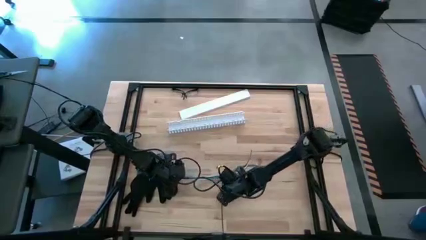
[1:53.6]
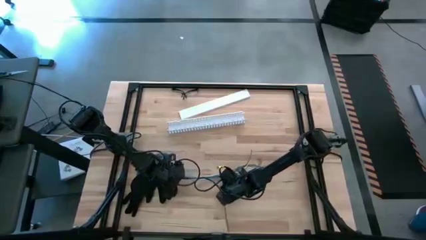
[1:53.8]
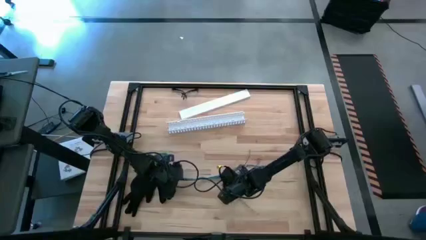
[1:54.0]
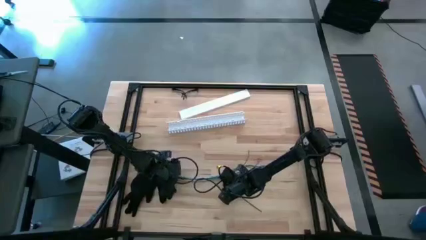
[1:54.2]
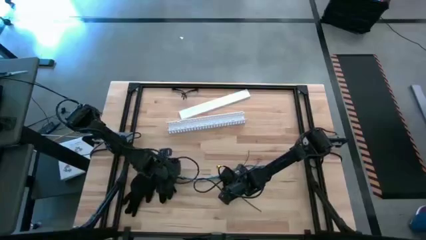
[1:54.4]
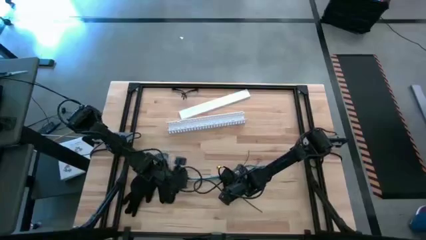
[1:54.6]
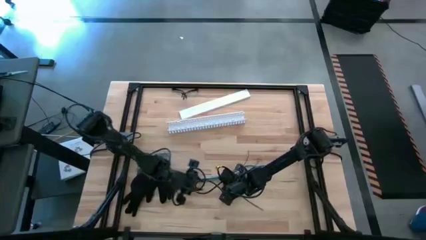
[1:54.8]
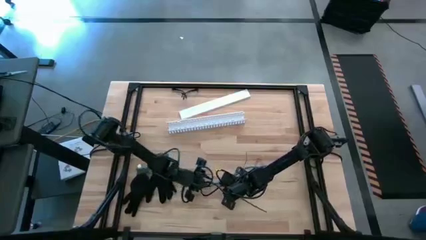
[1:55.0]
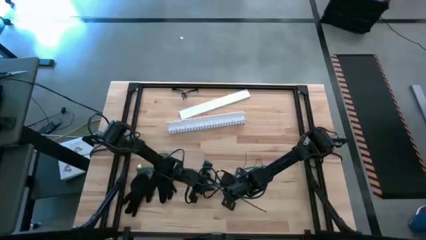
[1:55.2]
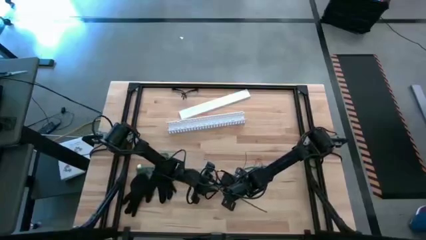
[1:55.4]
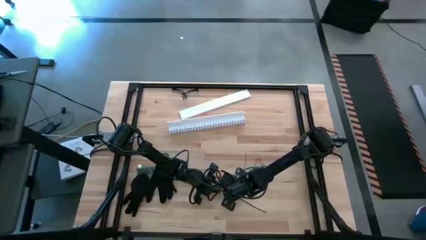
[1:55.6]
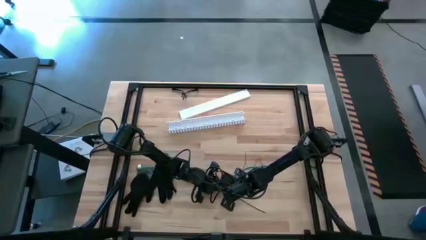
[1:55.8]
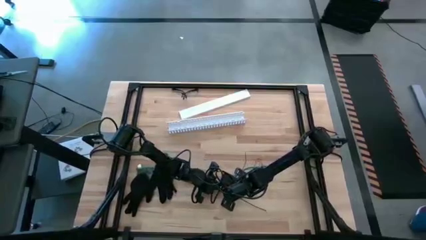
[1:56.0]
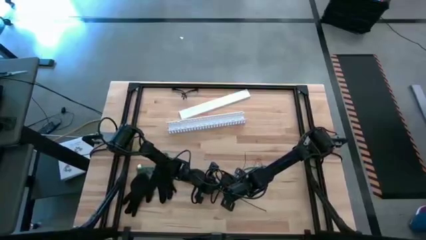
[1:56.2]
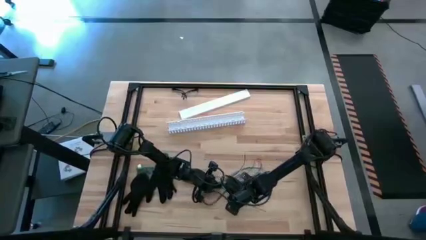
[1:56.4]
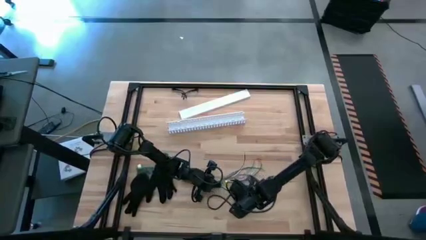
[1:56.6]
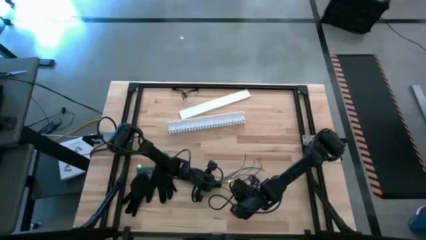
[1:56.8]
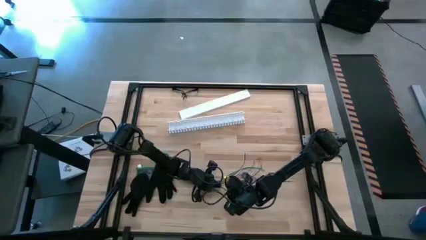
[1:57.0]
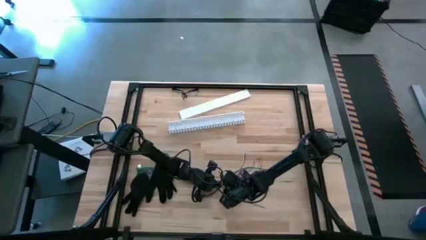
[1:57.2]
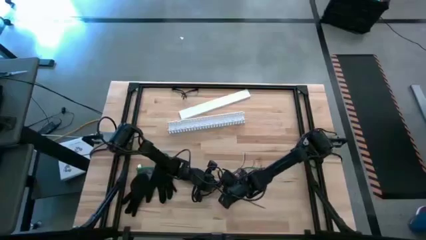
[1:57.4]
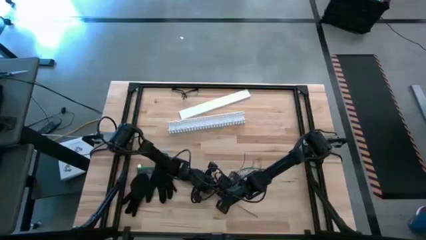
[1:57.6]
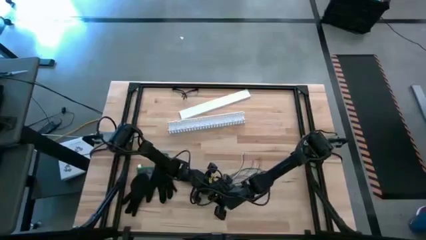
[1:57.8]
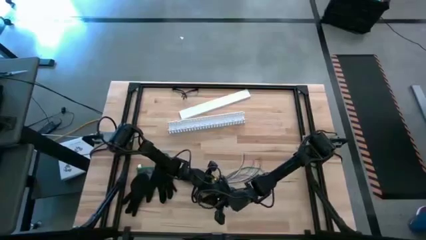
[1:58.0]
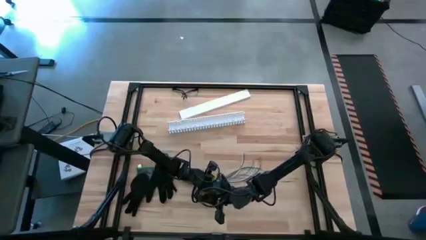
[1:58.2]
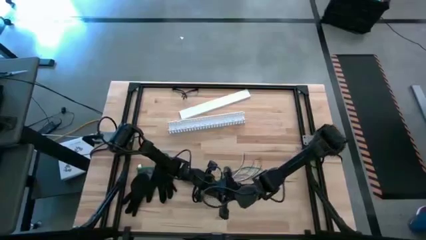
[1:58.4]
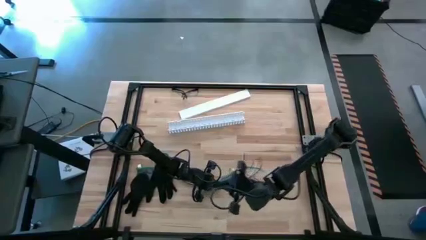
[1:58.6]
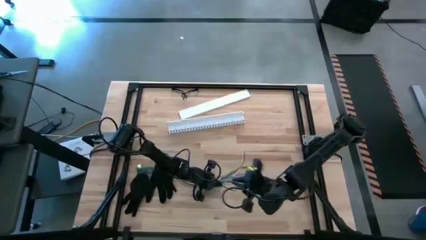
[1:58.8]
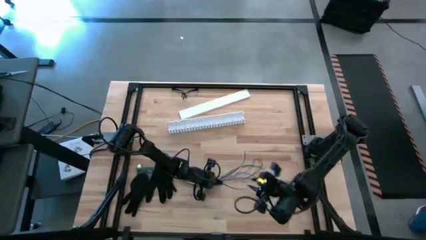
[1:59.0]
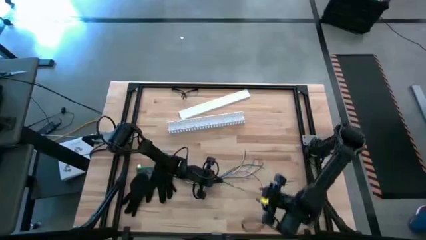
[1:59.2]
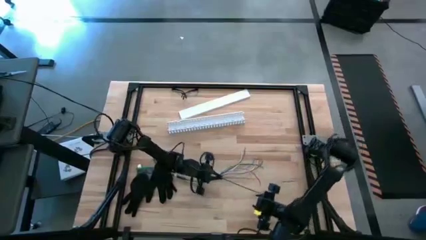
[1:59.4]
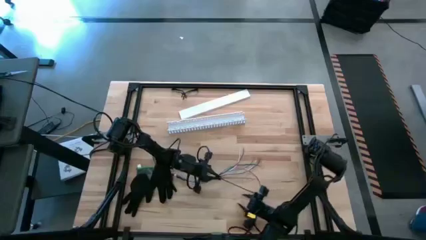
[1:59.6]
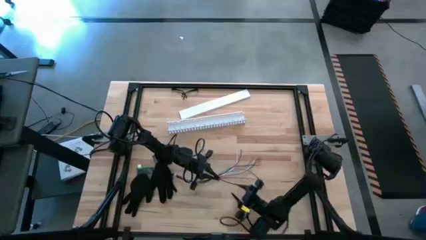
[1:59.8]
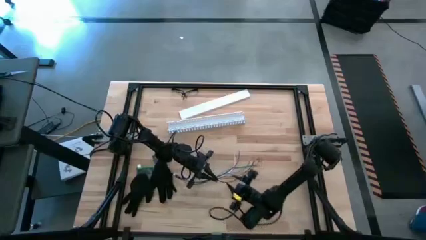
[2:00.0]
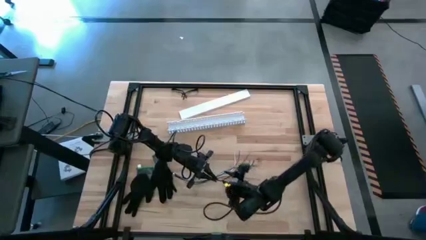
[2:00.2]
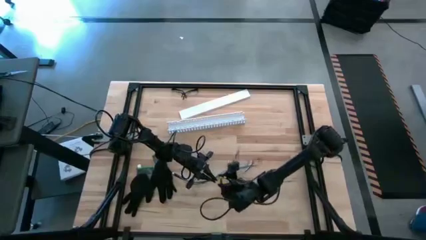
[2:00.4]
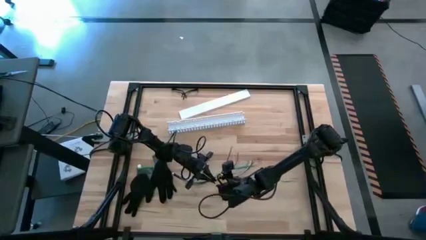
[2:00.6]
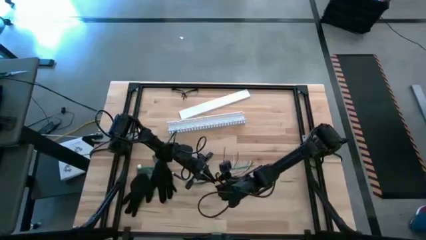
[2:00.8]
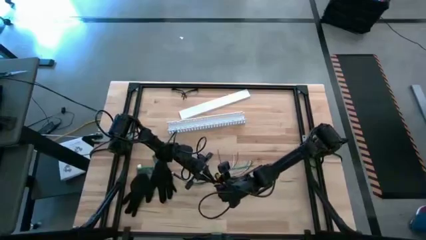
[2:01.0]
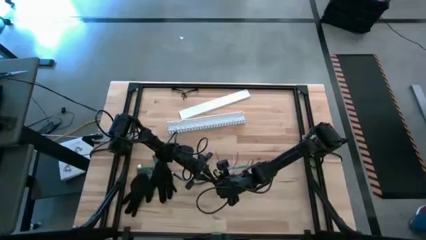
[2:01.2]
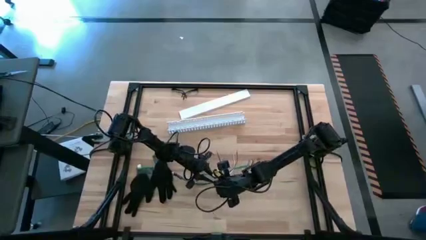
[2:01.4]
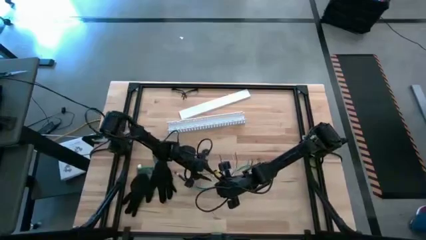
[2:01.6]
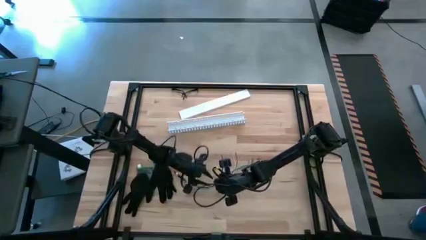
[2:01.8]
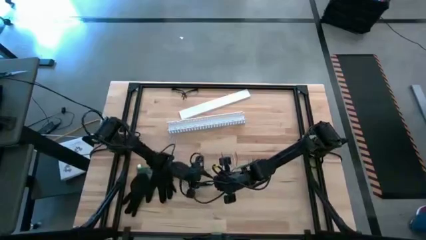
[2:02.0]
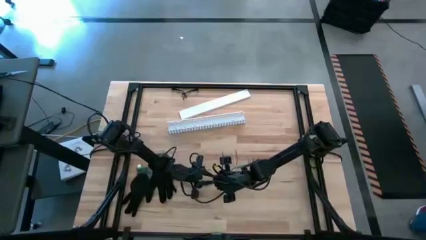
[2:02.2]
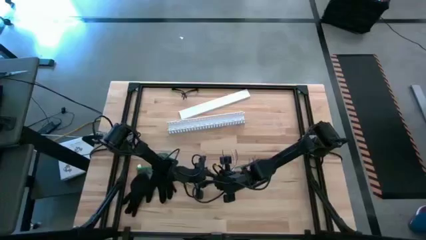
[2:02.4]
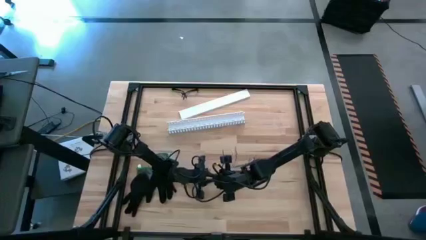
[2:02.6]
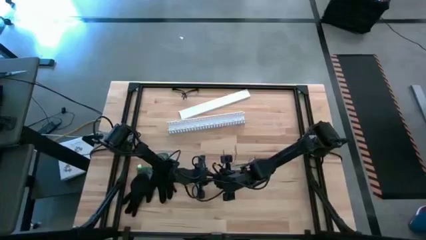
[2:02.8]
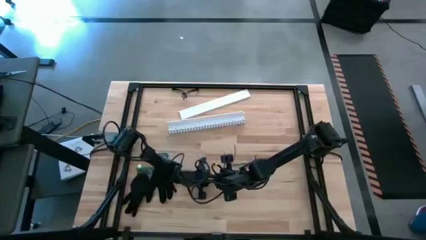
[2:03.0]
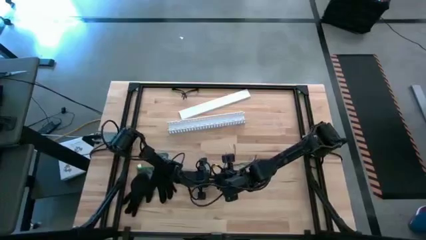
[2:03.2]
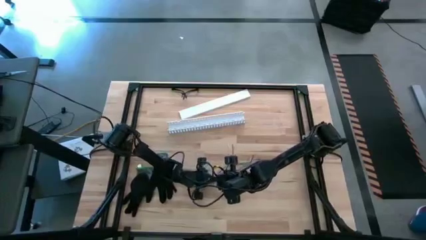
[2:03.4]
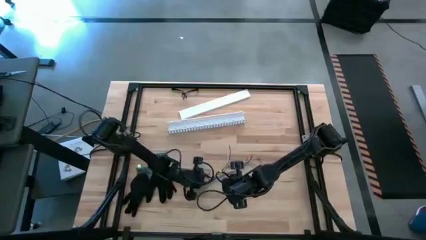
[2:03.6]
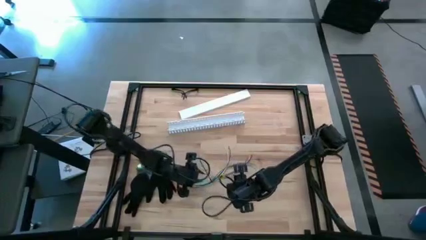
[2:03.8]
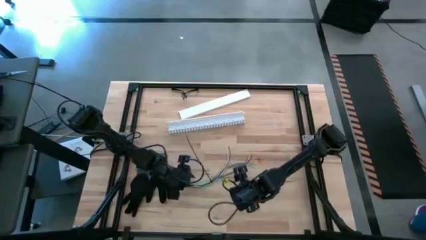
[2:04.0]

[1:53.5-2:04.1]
Task: Ziptie cables
Wrap the black zip tie on the cable

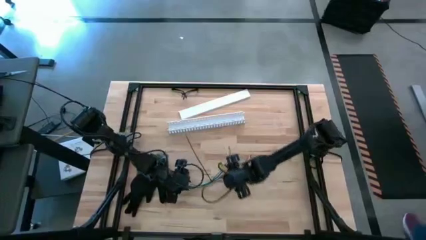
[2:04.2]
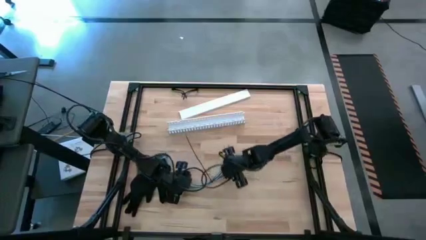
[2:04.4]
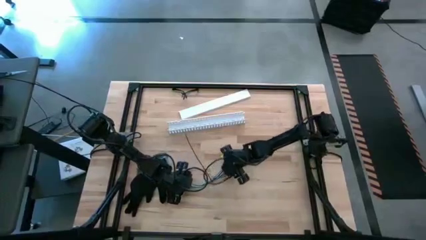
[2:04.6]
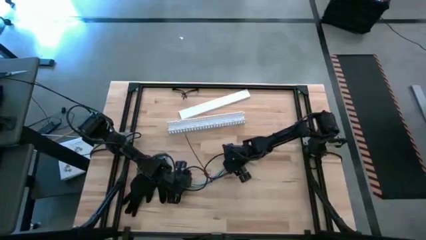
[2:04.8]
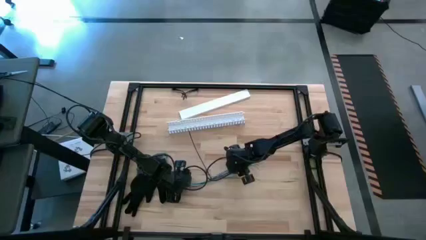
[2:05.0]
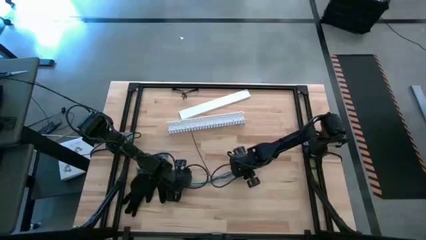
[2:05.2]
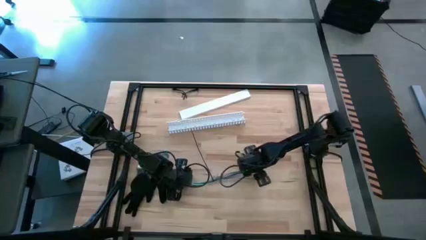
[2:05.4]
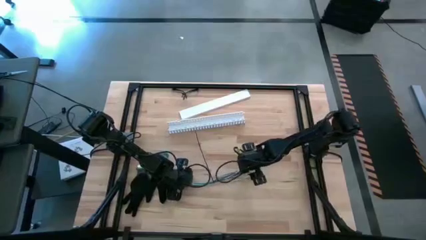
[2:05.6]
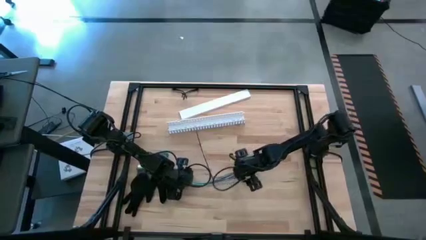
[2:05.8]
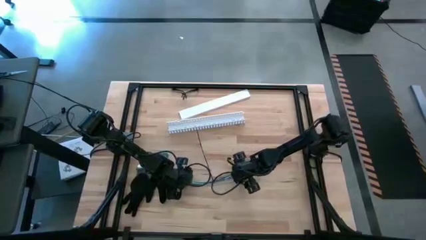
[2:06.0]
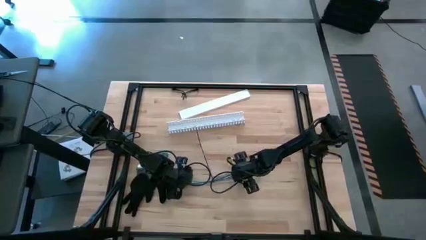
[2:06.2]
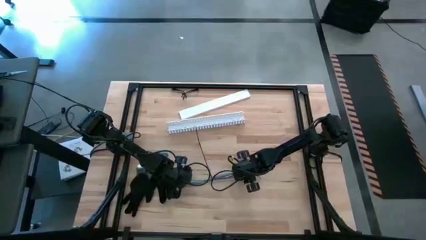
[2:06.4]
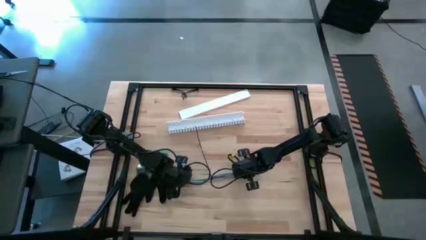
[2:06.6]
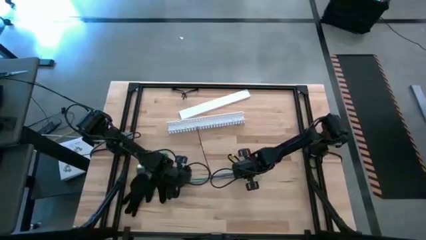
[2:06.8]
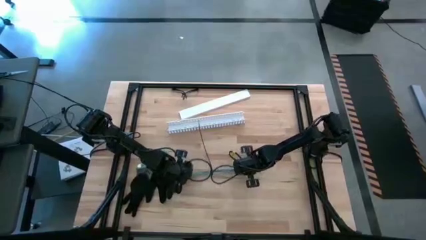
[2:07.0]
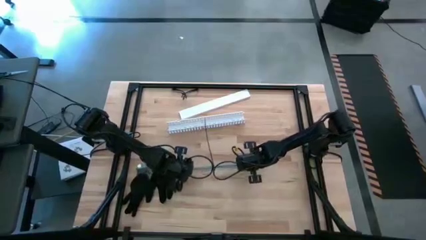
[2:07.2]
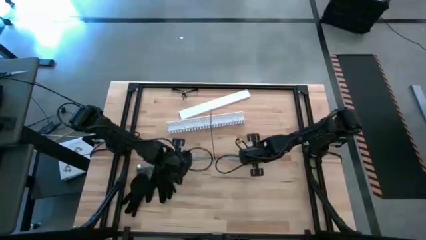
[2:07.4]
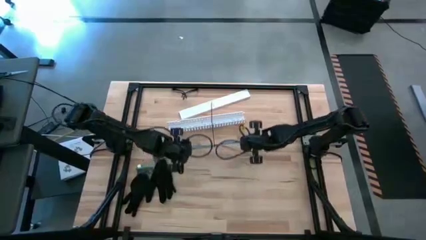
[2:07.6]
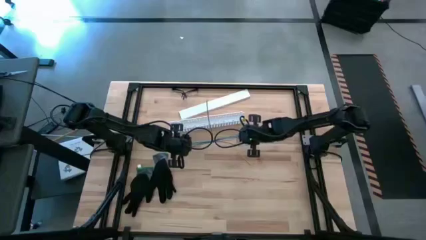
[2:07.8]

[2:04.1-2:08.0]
Put the cable into the white cable duct

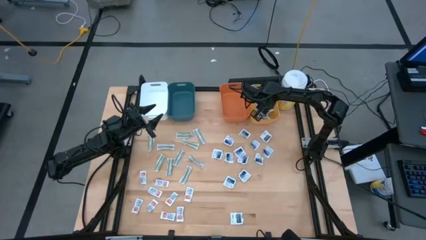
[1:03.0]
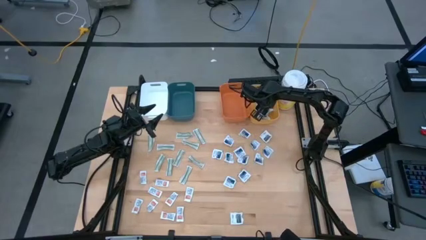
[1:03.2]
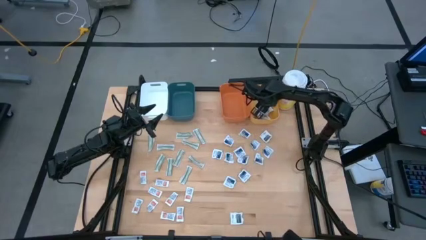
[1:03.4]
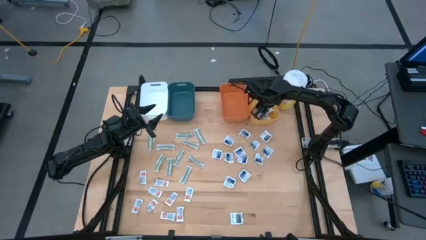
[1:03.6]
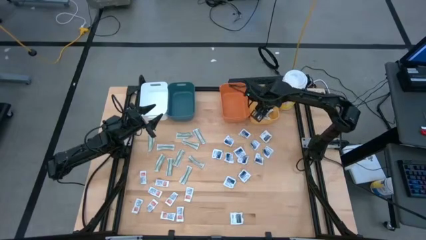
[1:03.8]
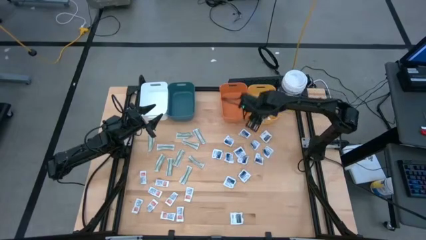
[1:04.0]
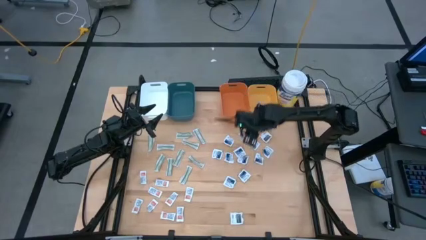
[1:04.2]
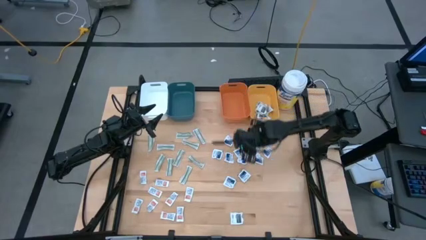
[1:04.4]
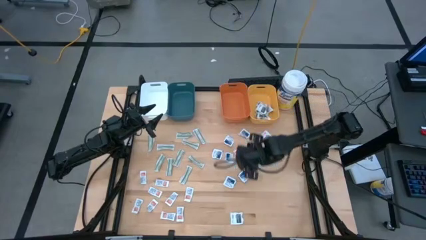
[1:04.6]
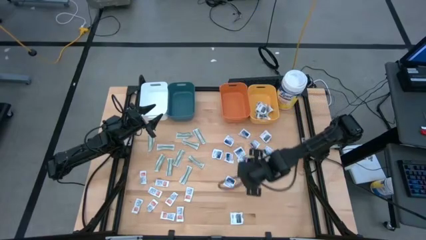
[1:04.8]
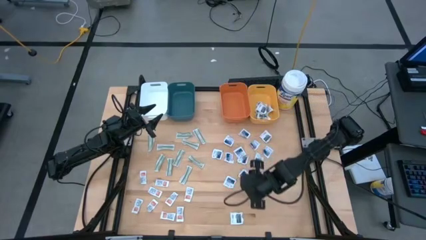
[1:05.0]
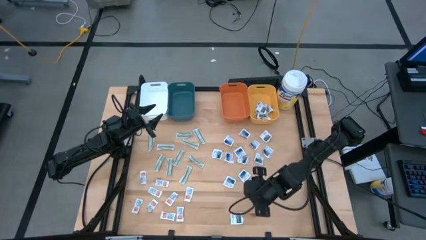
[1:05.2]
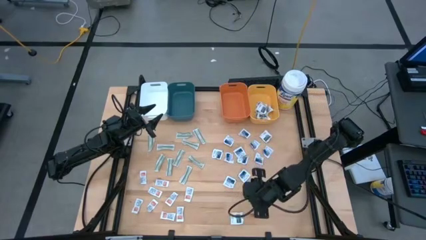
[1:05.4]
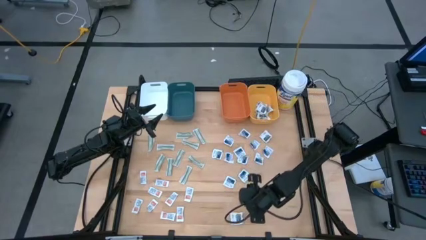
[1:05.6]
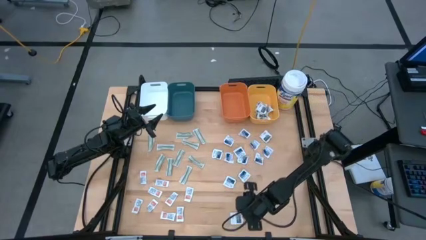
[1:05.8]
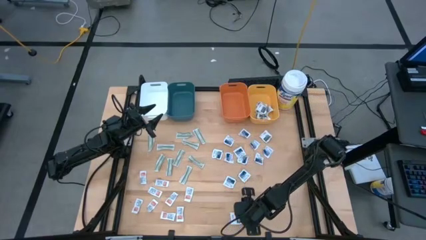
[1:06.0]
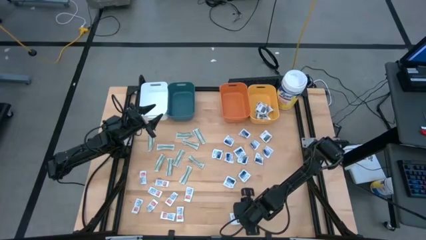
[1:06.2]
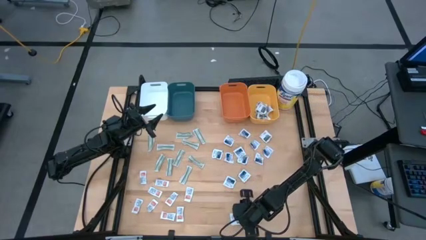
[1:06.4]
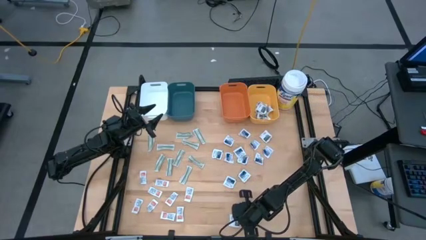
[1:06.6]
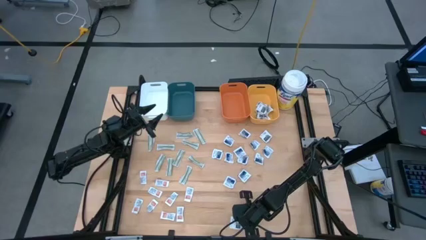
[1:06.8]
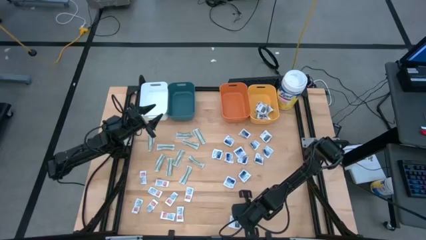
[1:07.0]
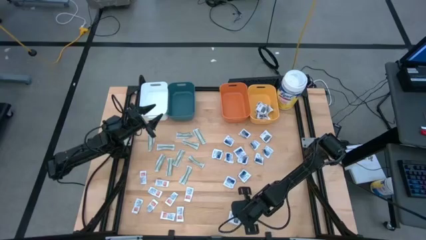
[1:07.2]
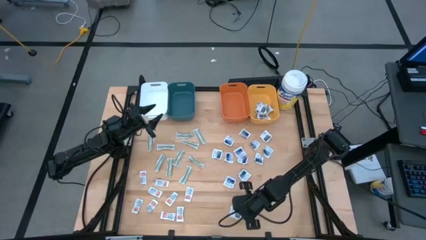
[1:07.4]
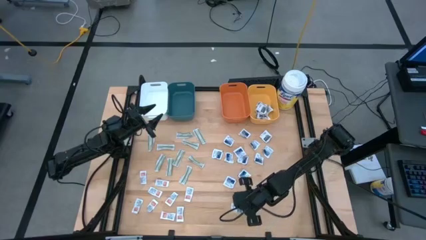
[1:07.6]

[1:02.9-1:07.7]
Task: Pick & Place First Aid Supplies
Put the towelette pack into the yellow bin
